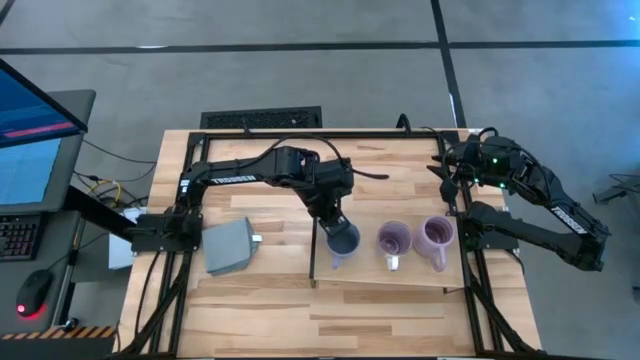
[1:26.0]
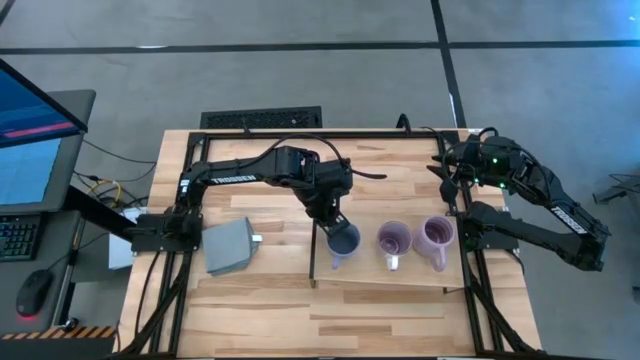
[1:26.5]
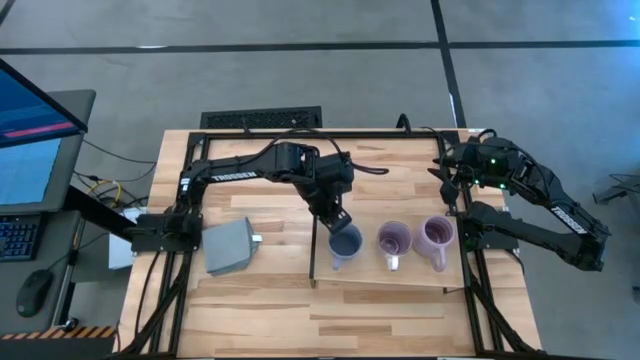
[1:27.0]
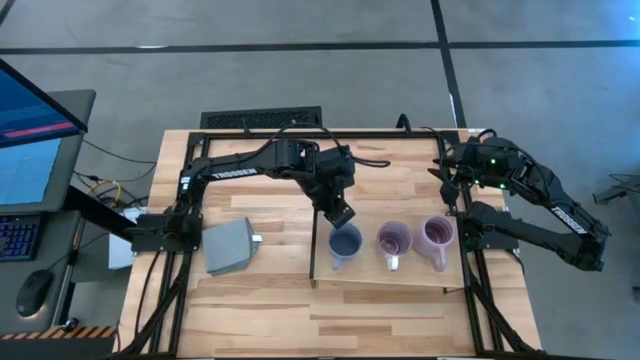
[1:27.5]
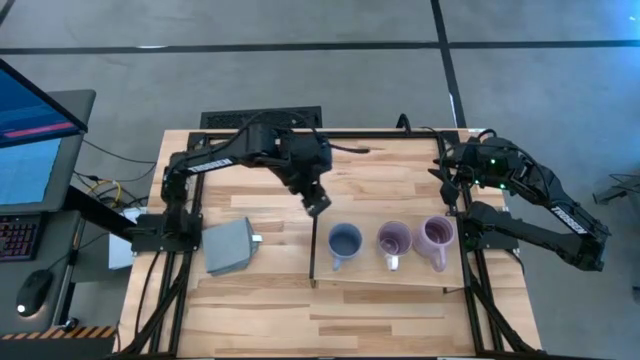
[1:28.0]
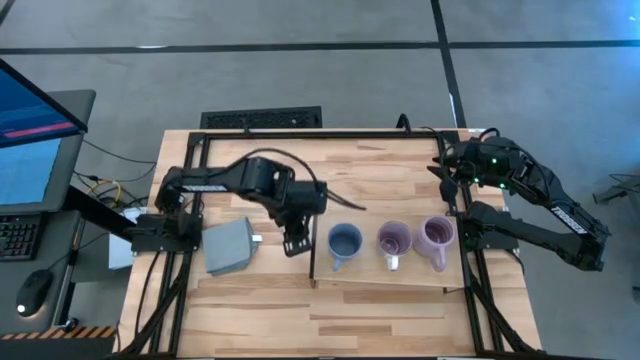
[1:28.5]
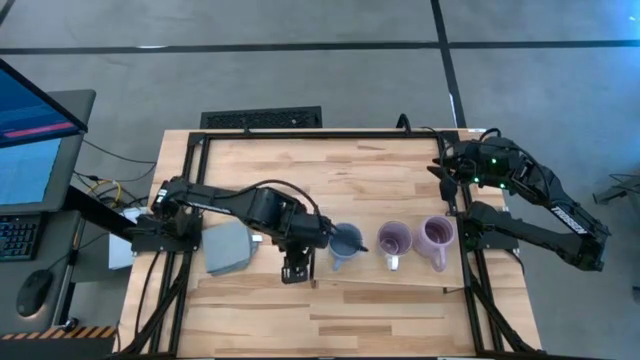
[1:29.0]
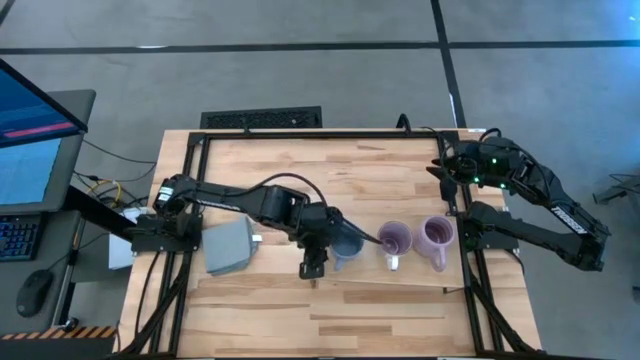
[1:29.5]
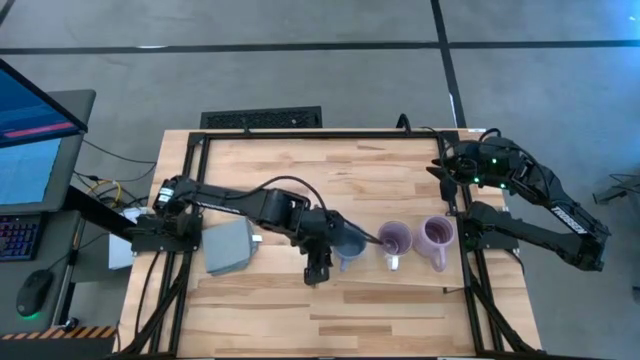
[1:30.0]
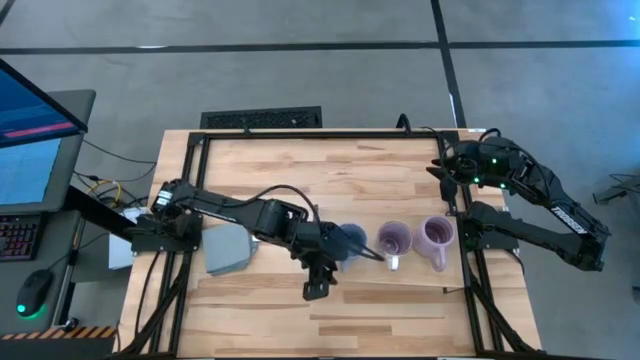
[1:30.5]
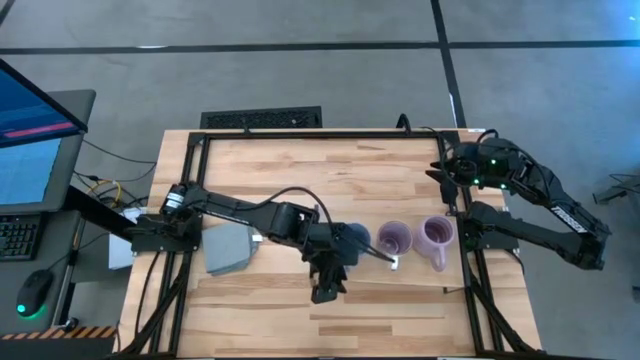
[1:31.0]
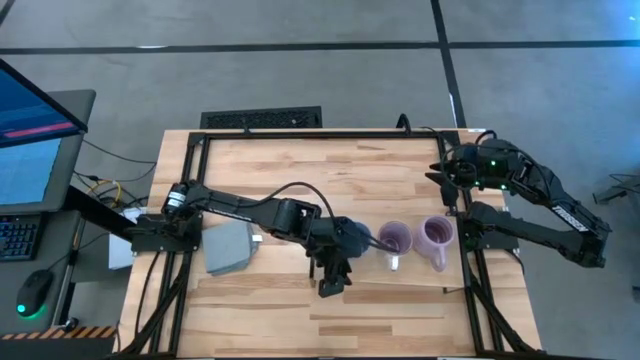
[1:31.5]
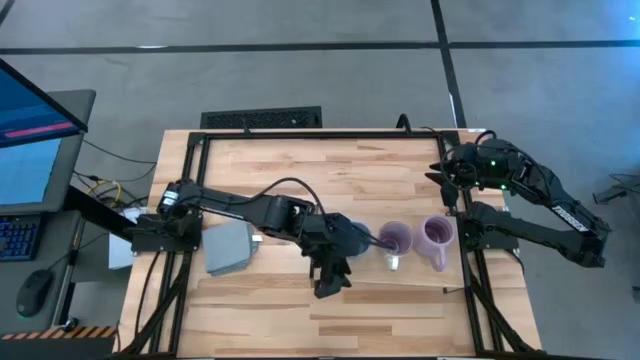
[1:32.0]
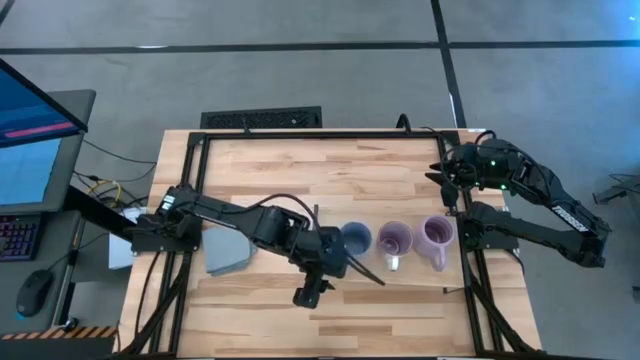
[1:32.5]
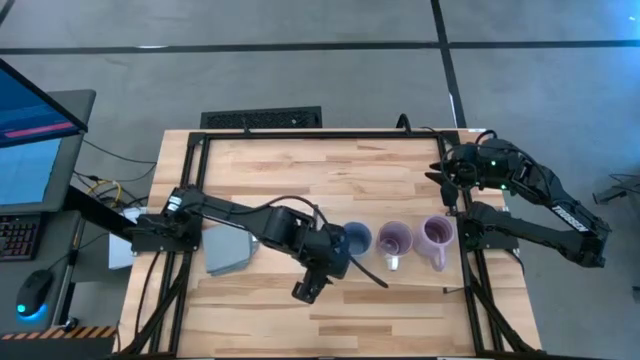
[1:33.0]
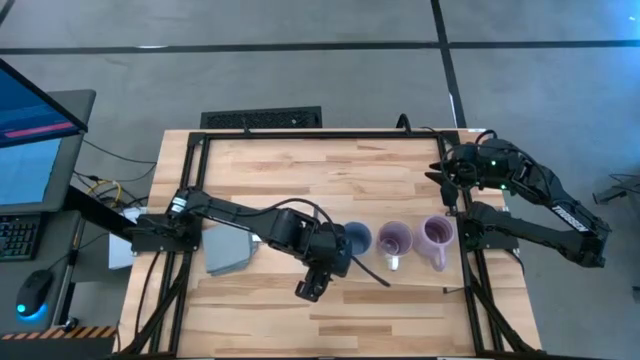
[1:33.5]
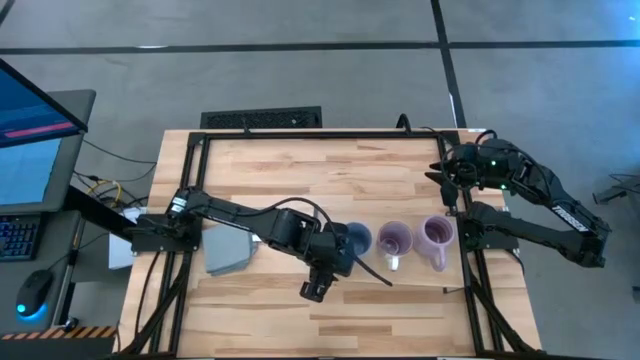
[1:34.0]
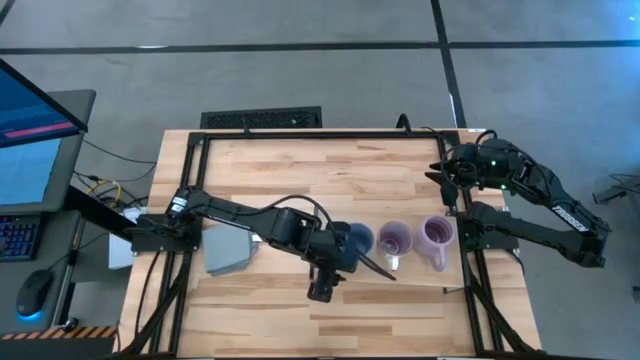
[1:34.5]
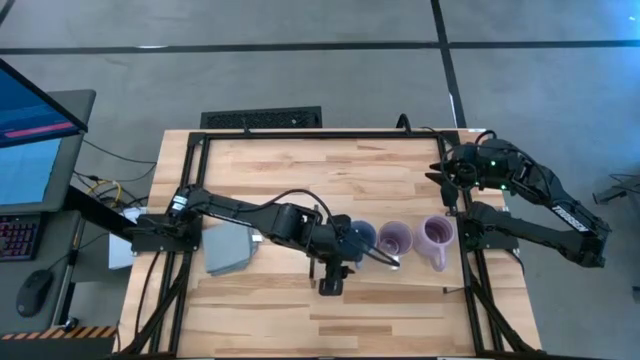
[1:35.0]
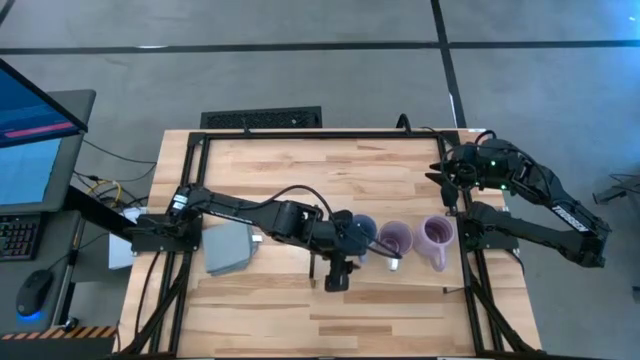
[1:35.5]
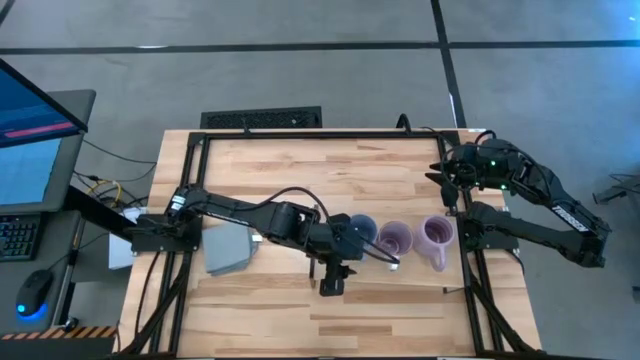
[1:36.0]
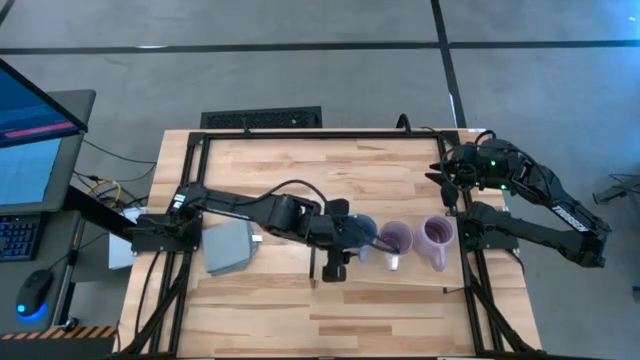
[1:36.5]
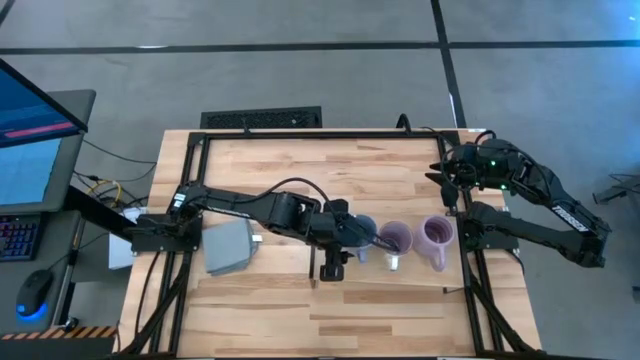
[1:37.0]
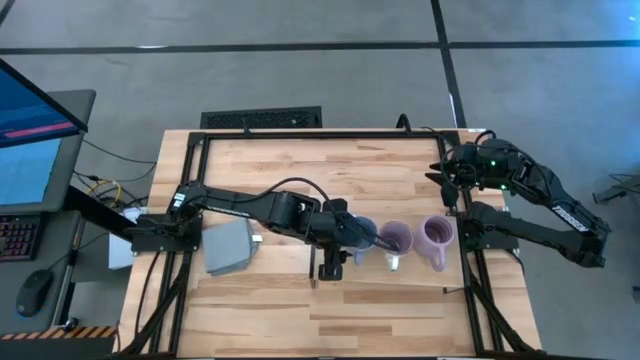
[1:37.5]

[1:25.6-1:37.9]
Task: Stack small to large cups/mugs on shelf
Put the blue mug on the shelf

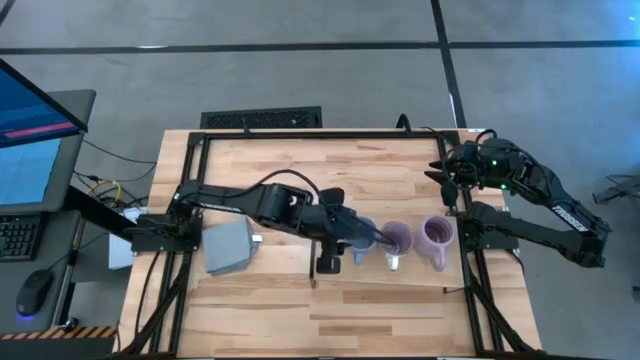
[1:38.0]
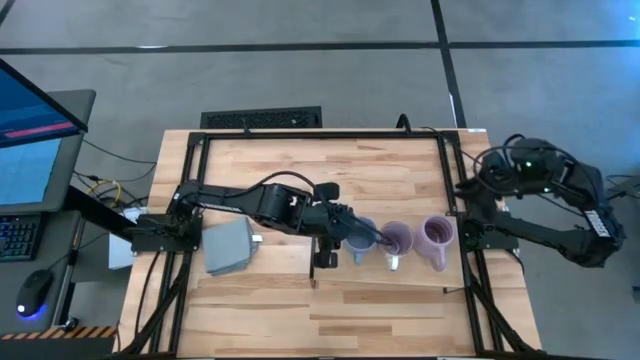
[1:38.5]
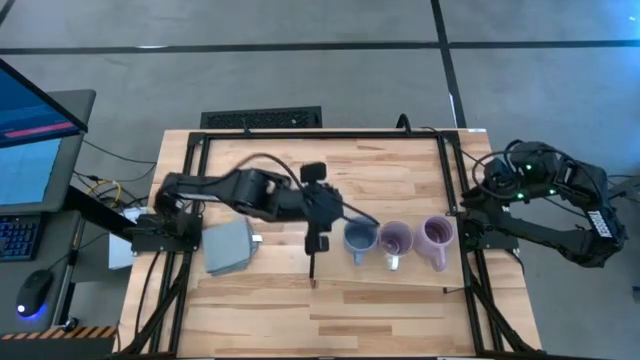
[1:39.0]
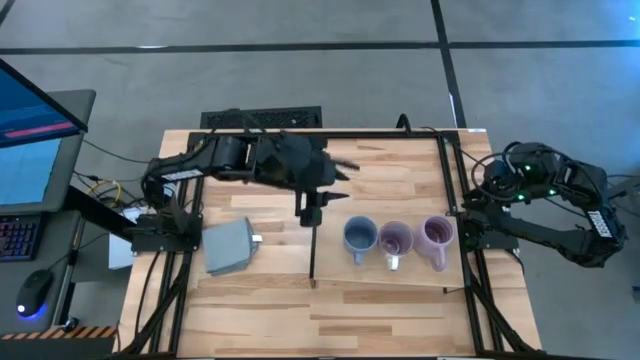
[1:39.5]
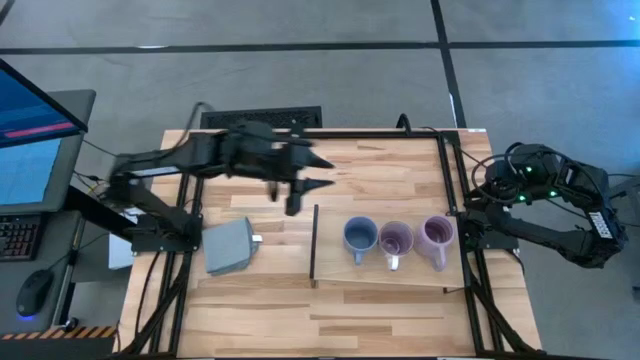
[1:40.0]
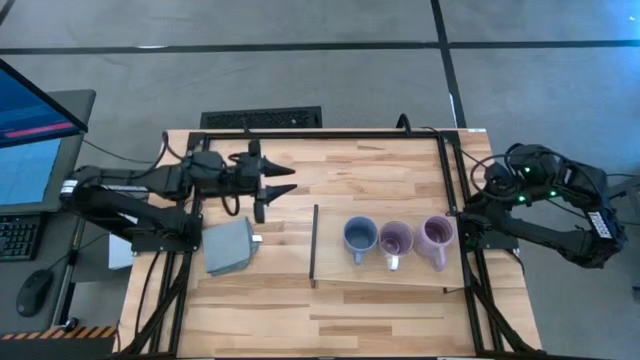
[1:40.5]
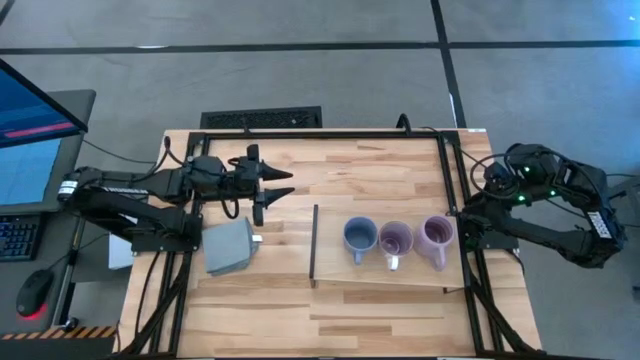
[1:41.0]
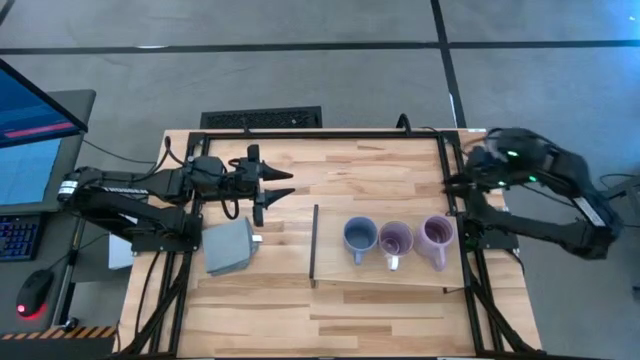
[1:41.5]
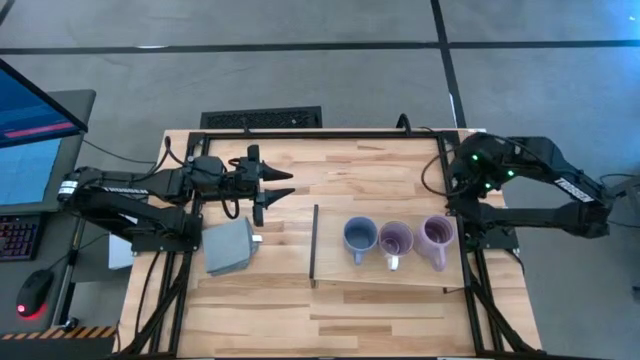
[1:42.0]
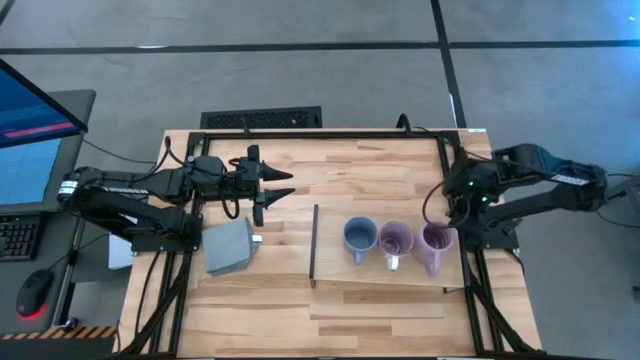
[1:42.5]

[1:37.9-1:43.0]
Adjust the purple mug on the shelf

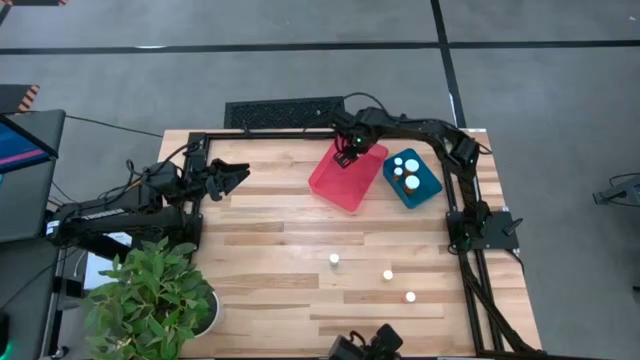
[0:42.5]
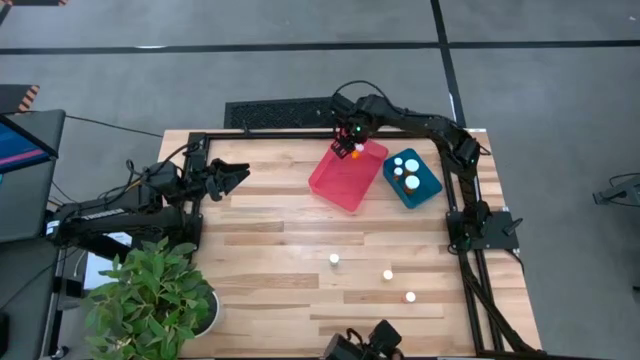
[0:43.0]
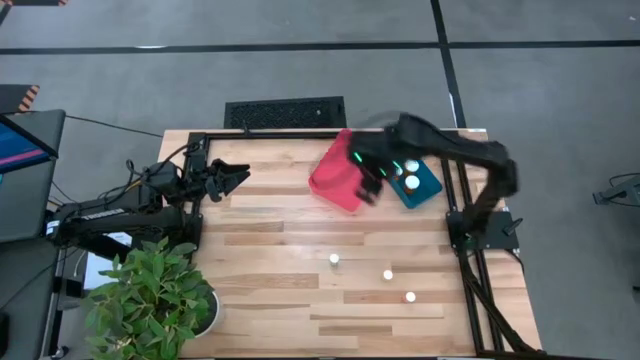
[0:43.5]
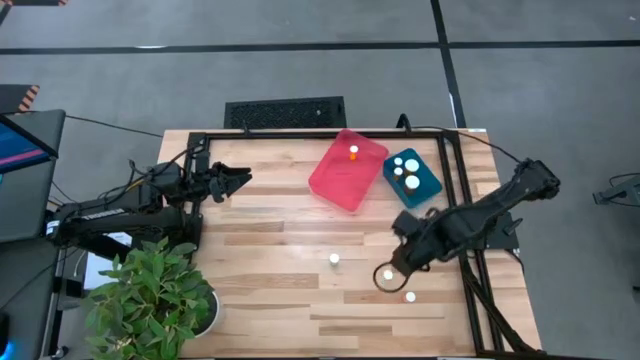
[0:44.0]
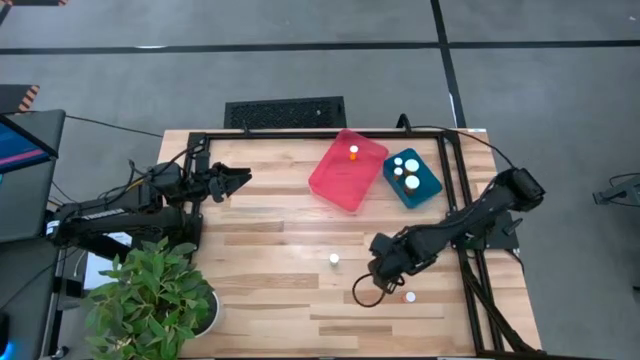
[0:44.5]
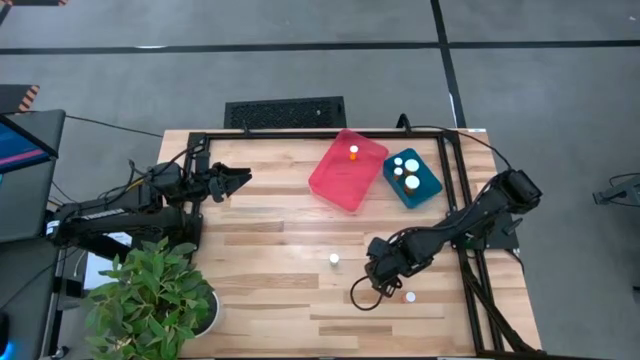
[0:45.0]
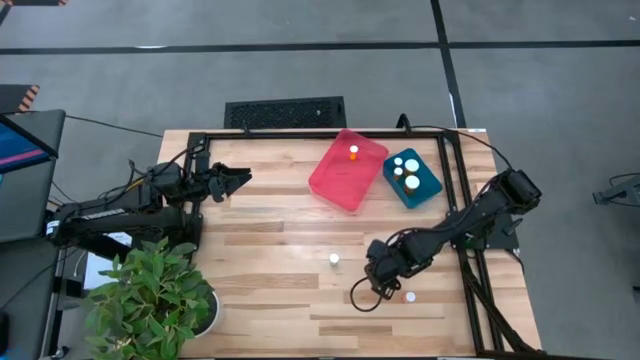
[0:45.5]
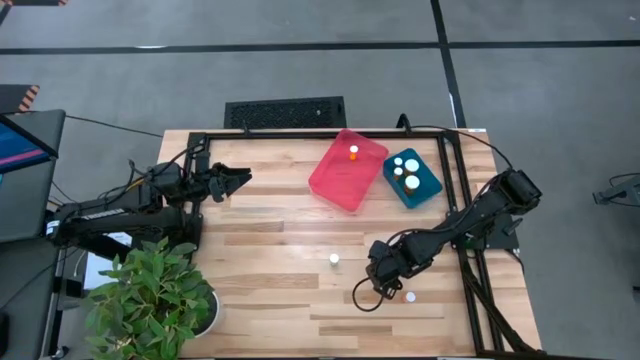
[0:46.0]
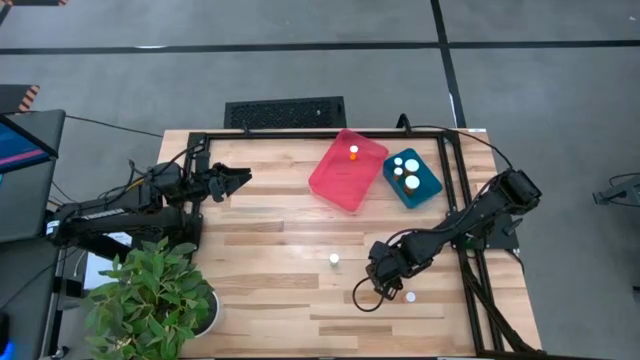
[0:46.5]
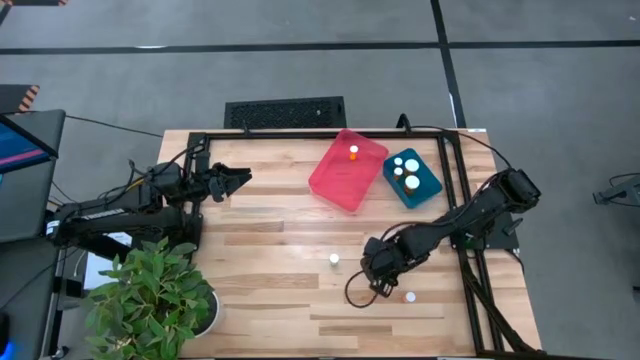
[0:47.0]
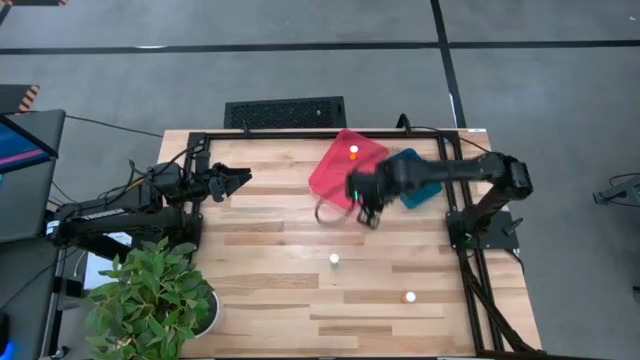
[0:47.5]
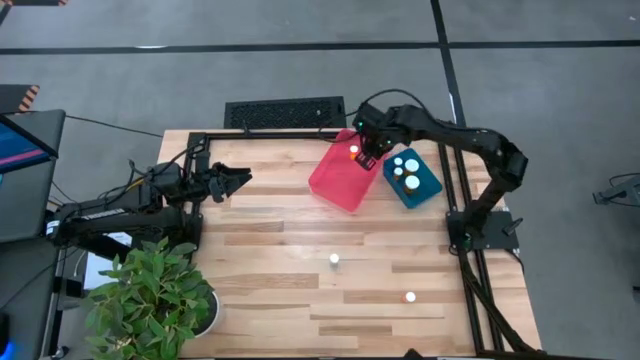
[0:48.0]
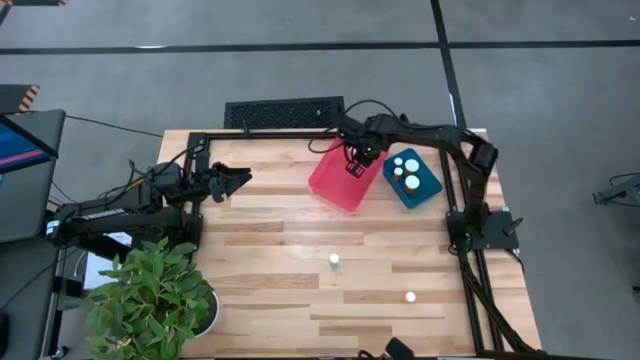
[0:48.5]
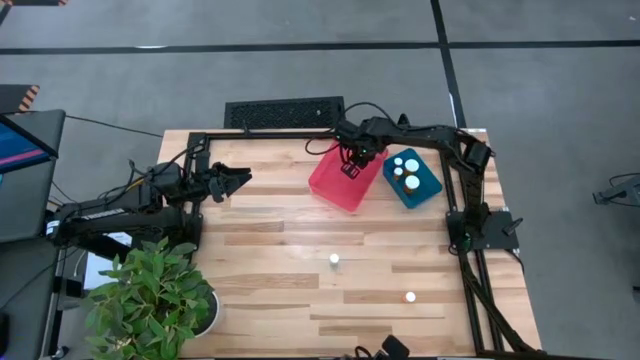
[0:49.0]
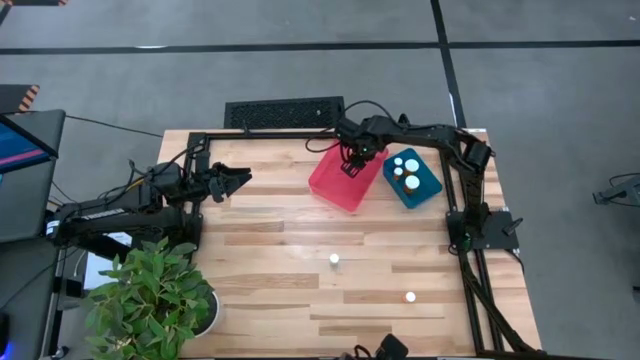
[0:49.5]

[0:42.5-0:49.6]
Task: Pick and place medicine bottles into bin by pill shape (circle, oval)
Put the yellow tablet bottle into the red bin
